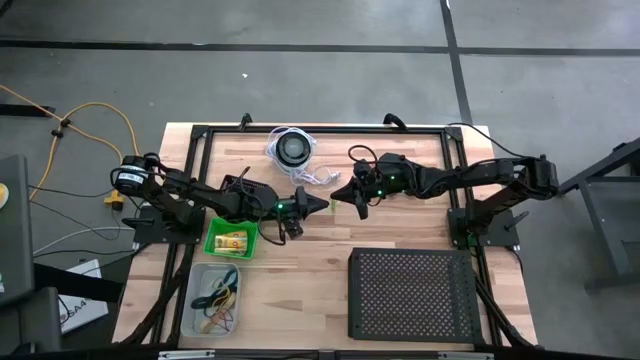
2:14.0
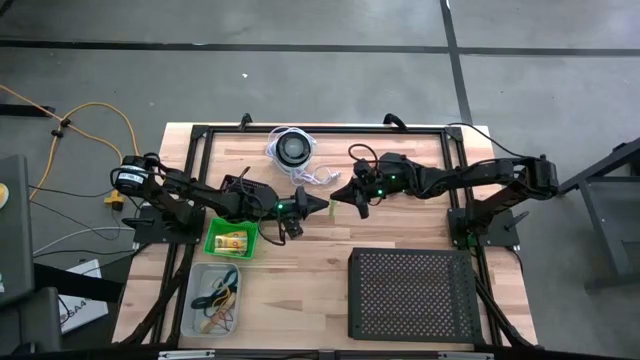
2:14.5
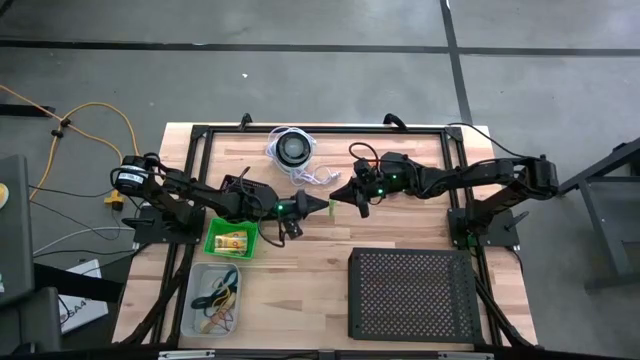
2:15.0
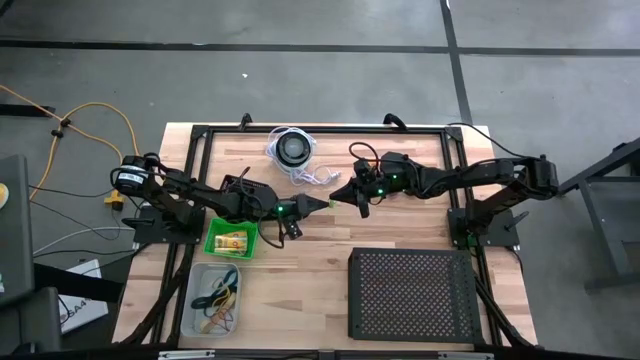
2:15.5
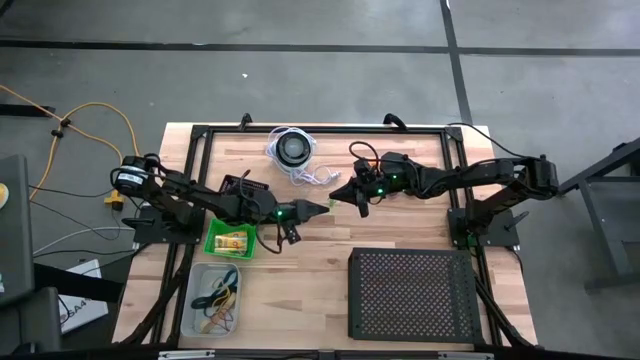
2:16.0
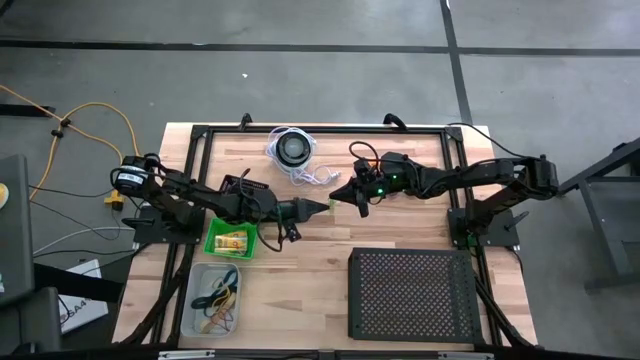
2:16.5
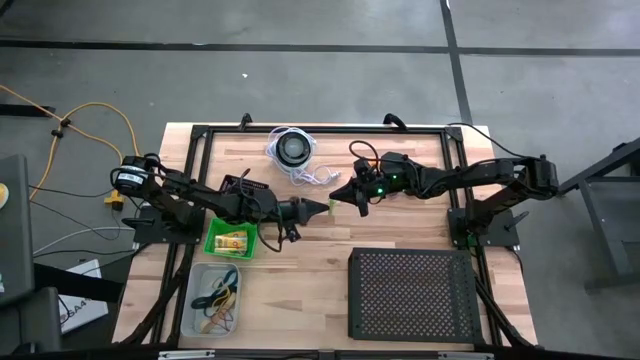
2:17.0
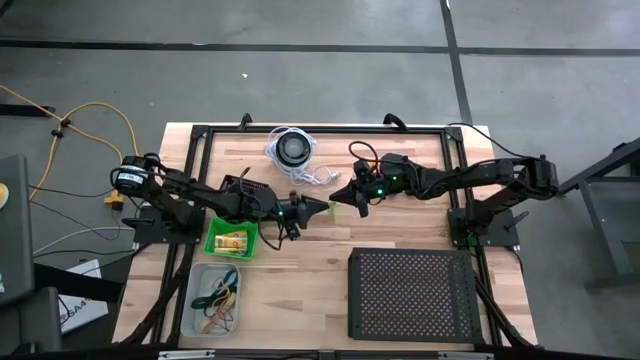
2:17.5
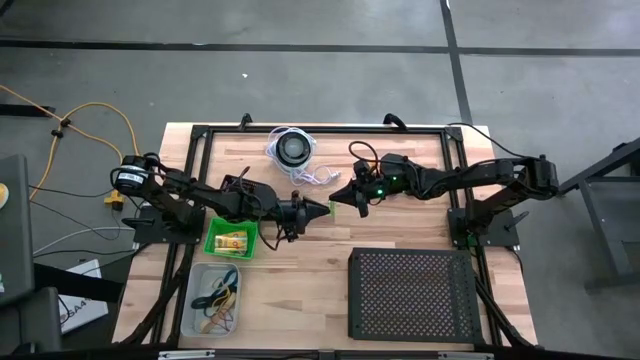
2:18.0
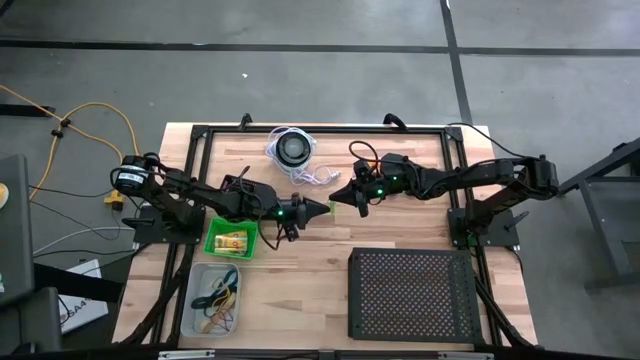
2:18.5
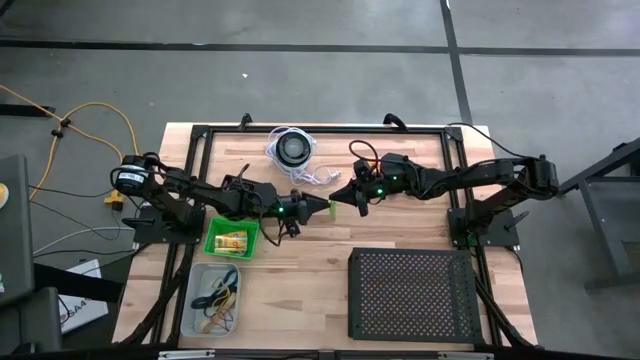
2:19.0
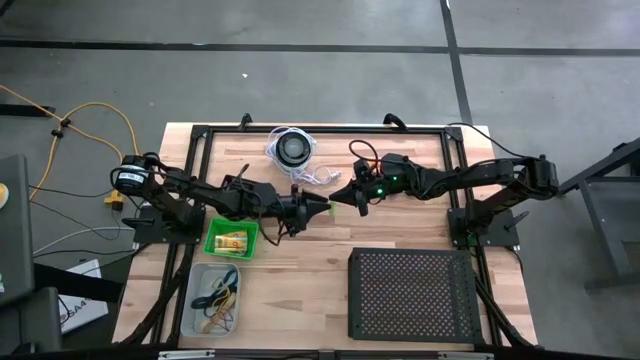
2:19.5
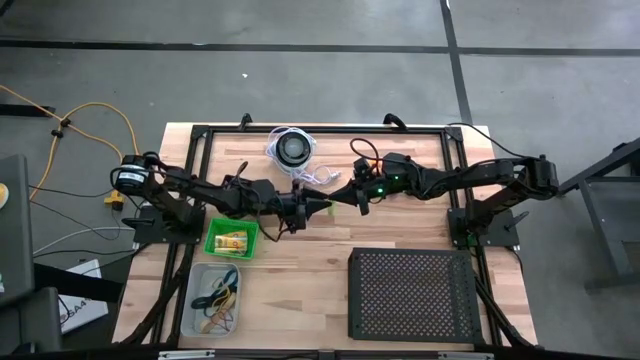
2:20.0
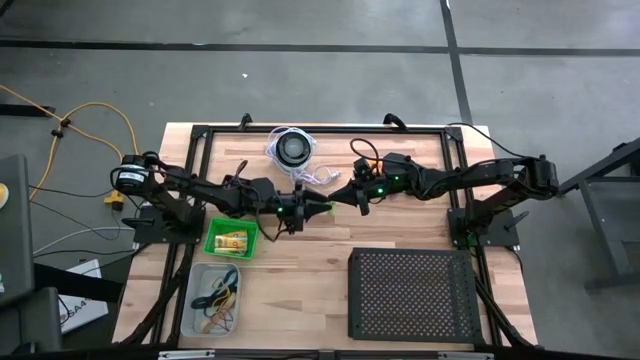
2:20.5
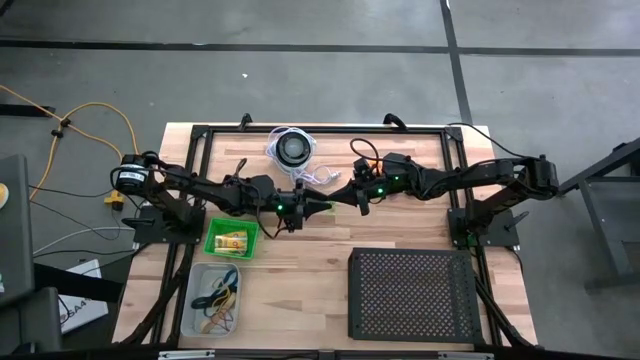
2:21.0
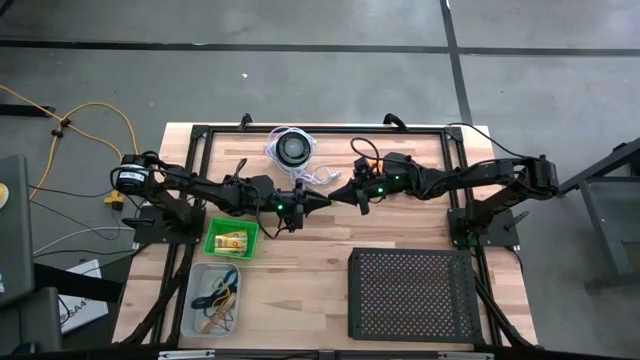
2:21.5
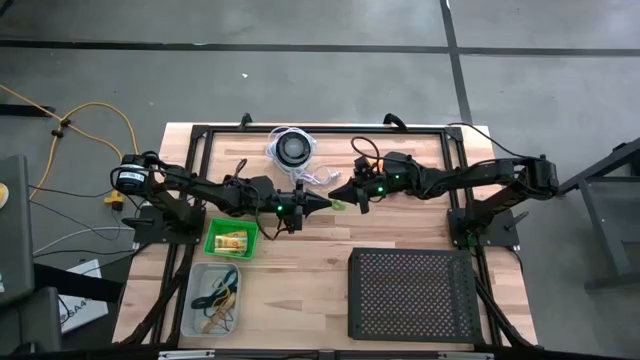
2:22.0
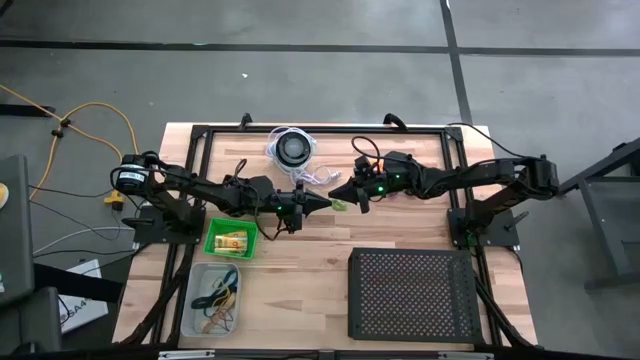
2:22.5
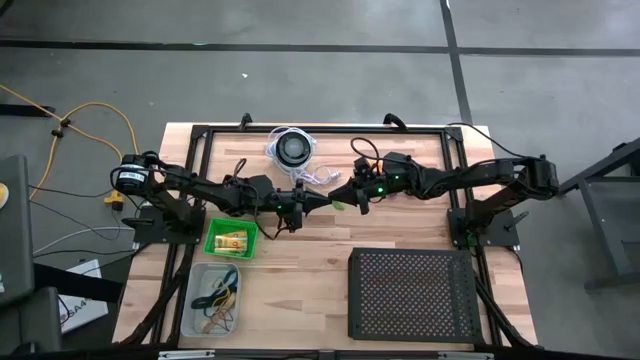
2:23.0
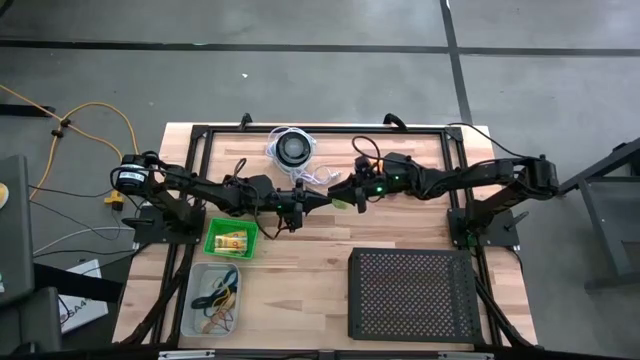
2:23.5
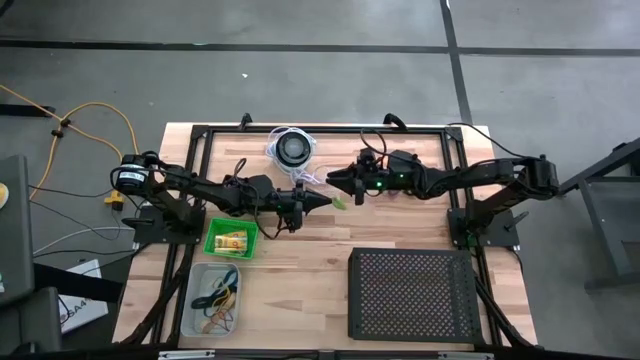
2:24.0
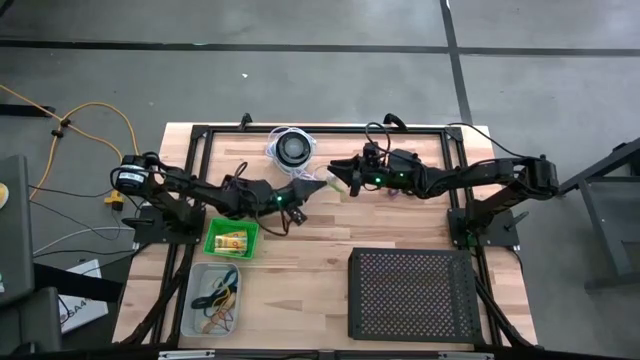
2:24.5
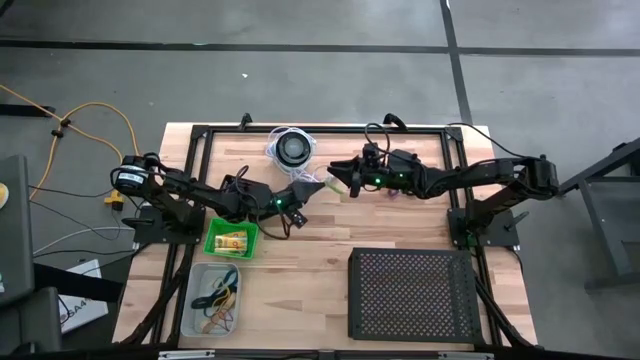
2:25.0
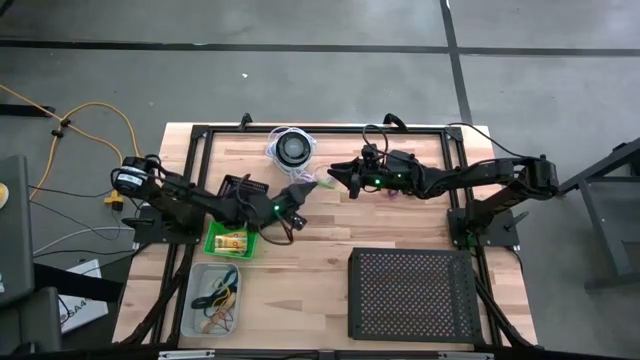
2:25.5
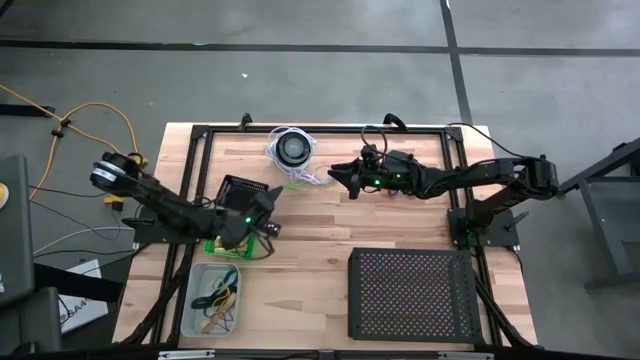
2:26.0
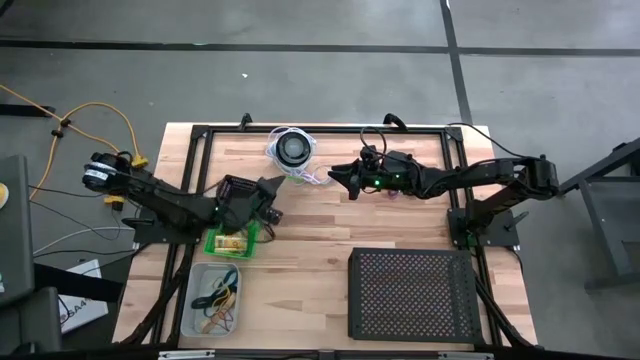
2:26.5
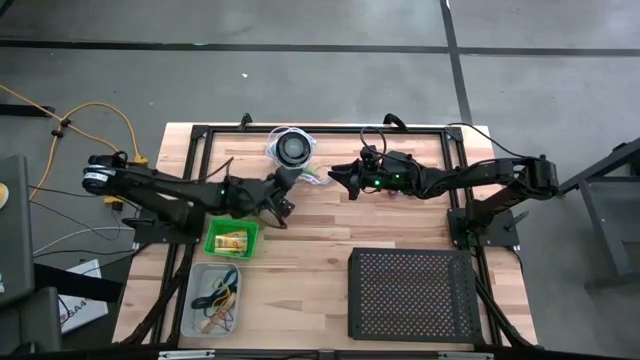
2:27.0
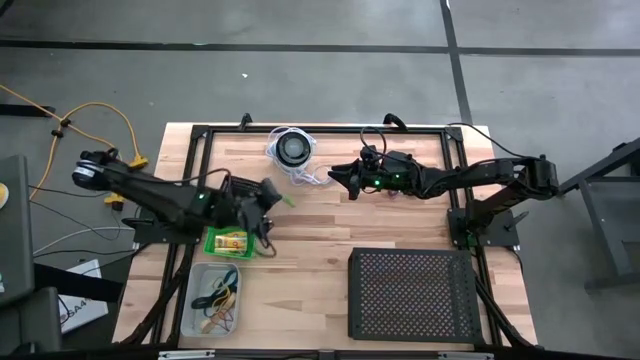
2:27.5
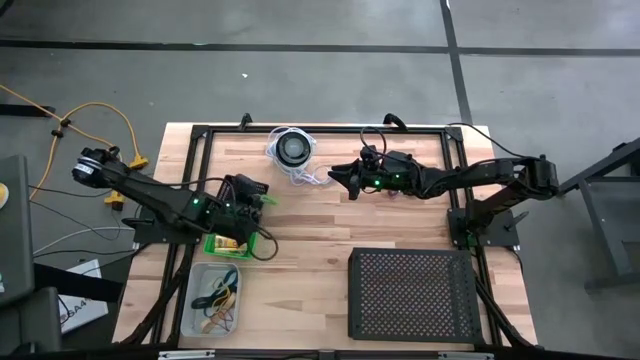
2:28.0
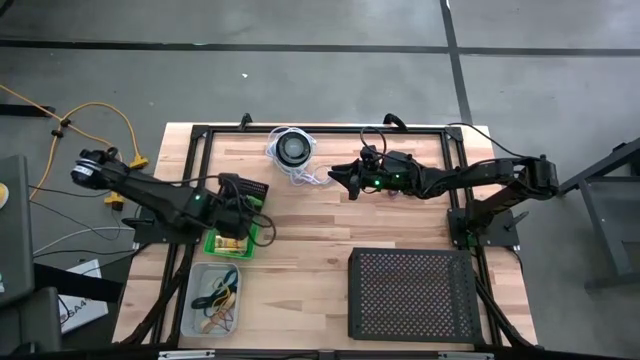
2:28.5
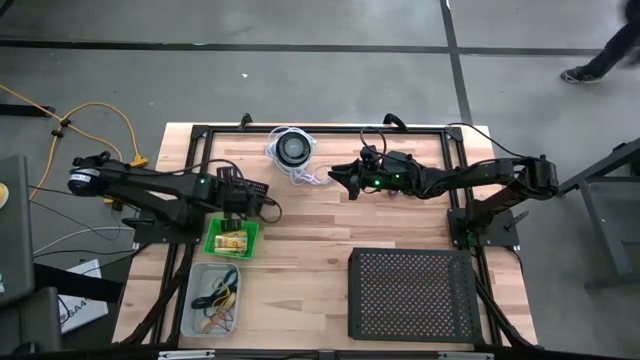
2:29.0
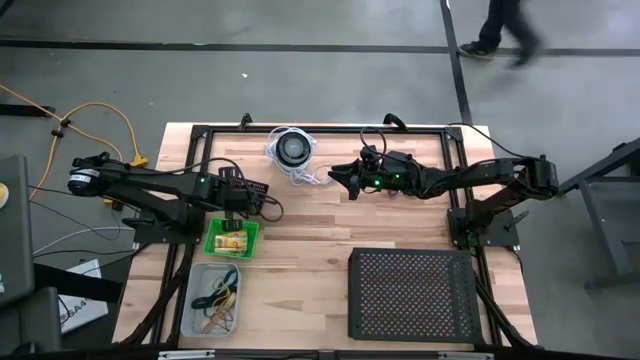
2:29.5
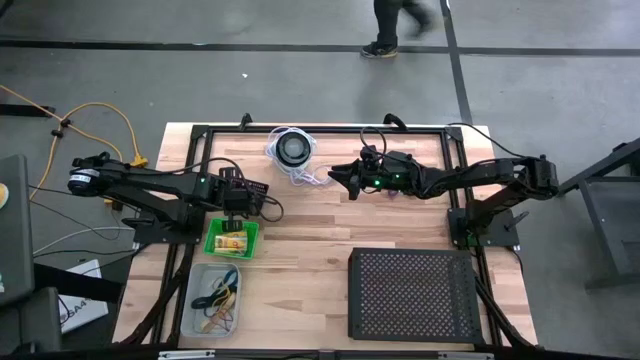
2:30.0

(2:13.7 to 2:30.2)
Task: Pick & Place Office Desk Supplies
Put the green coil keychain into the black bin

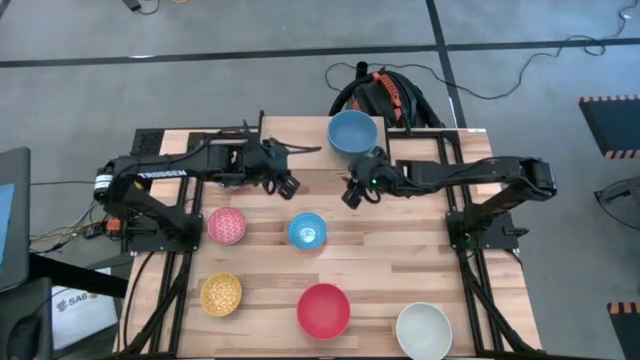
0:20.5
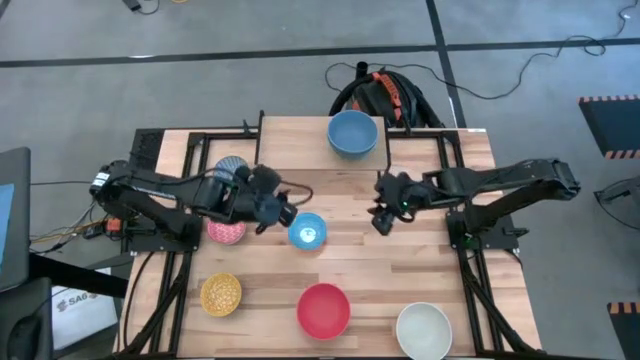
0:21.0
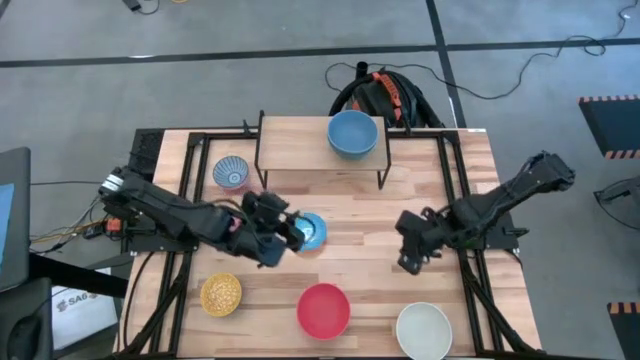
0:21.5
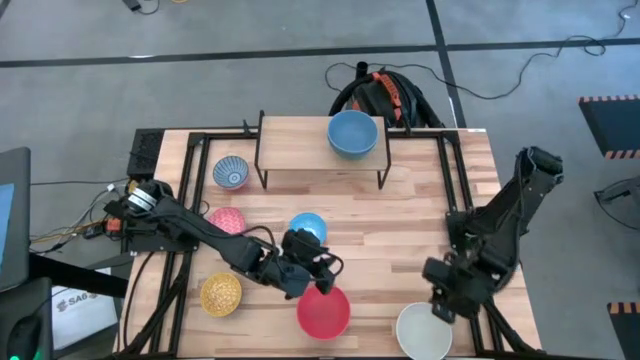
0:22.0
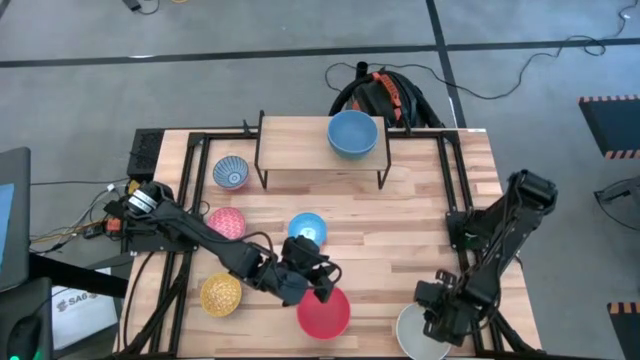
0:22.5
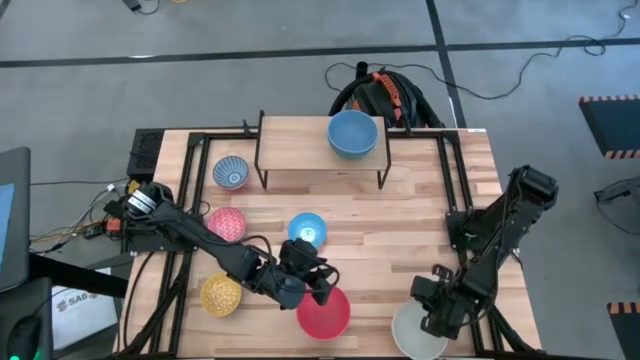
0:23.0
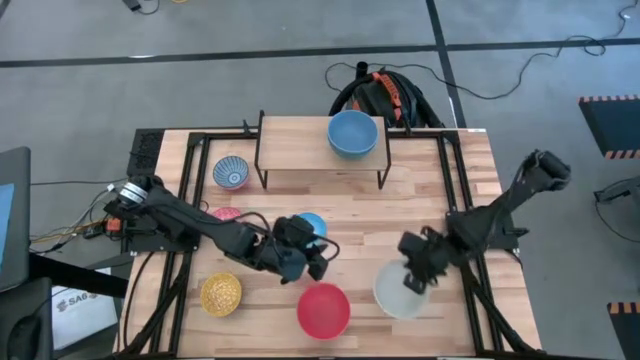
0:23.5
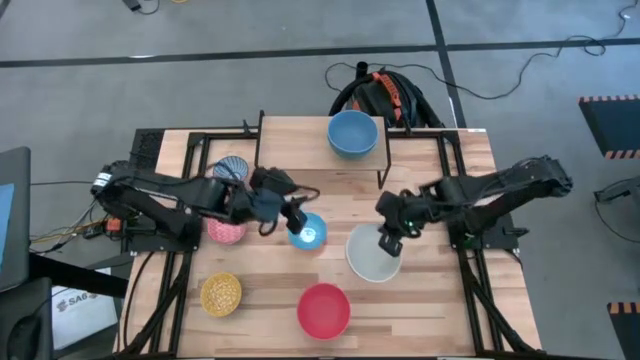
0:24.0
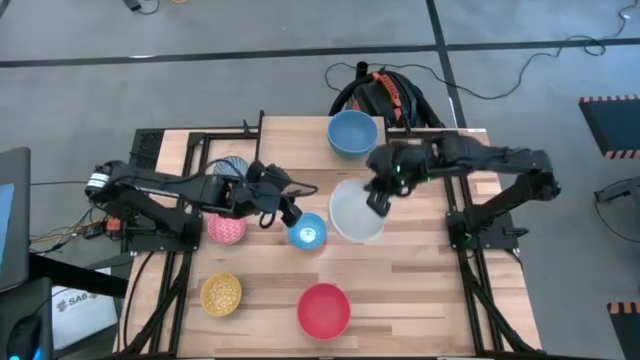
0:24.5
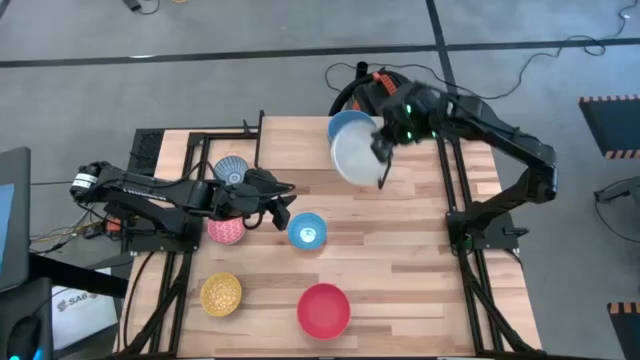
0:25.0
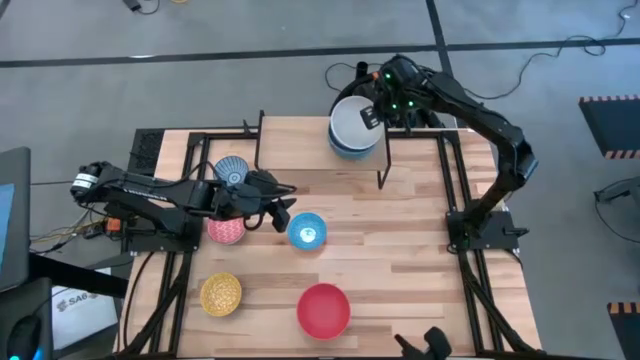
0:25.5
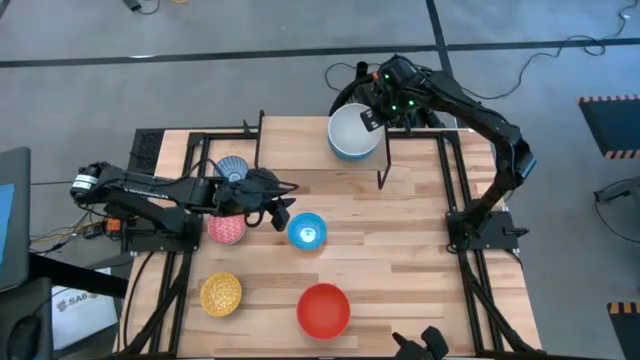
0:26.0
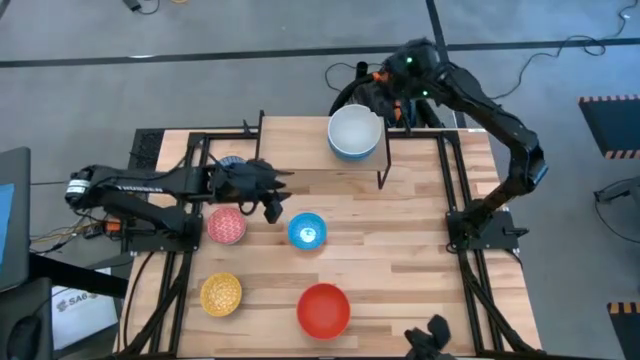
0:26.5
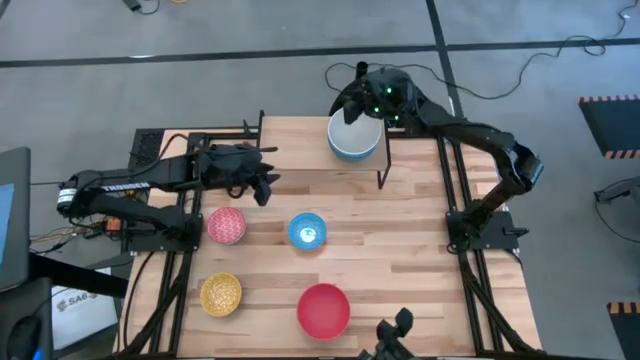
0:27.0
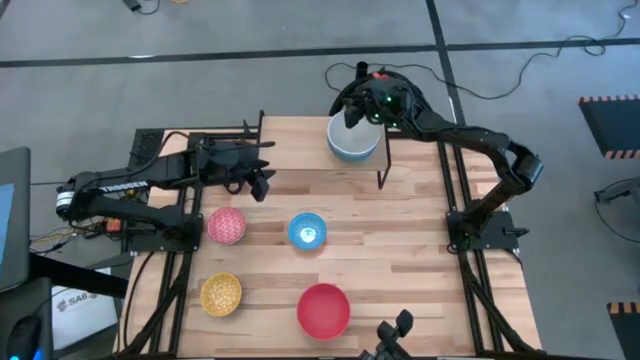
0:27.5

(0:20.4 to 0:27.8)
Task: Place and stack bowls onto a shelf
Stack the white bowl on top of the blue bowl on the shelf
